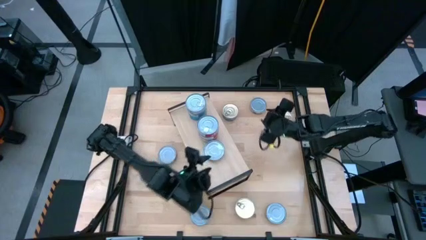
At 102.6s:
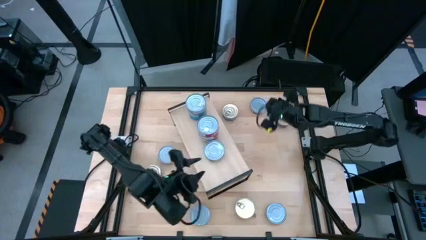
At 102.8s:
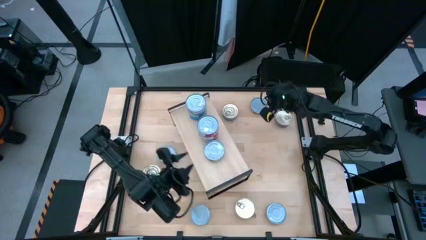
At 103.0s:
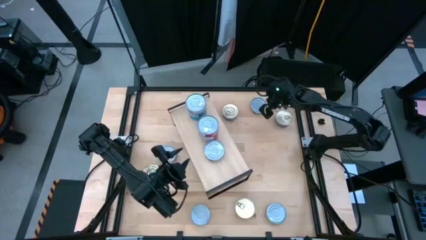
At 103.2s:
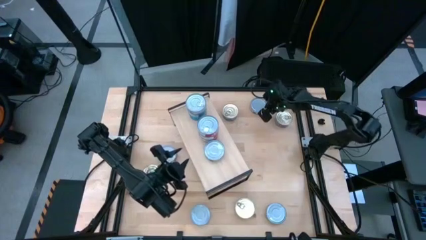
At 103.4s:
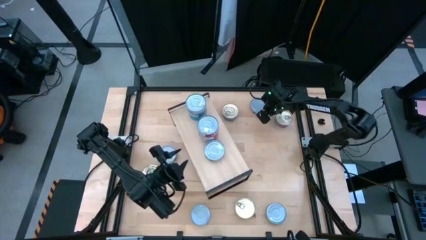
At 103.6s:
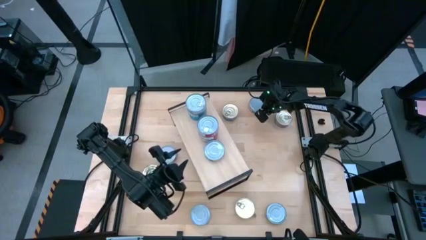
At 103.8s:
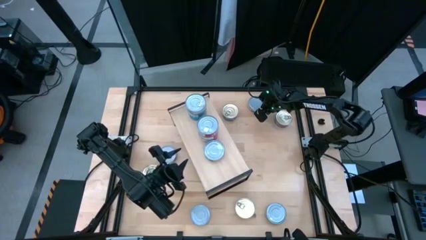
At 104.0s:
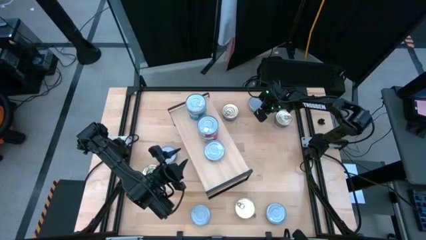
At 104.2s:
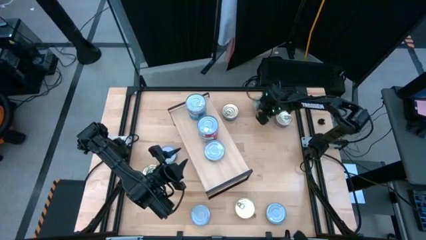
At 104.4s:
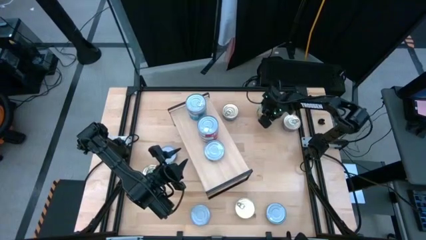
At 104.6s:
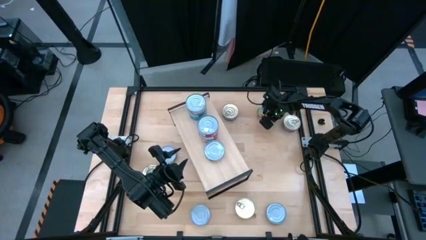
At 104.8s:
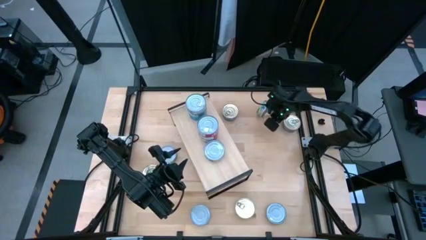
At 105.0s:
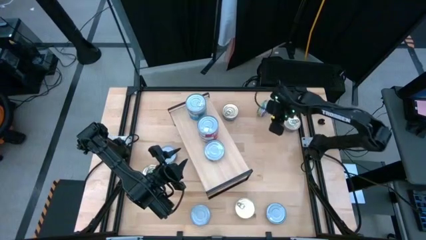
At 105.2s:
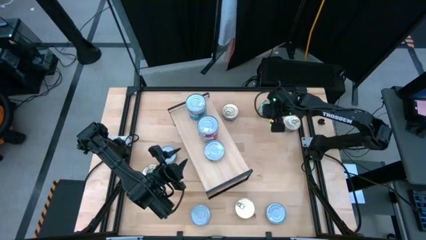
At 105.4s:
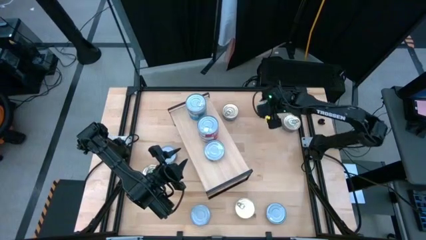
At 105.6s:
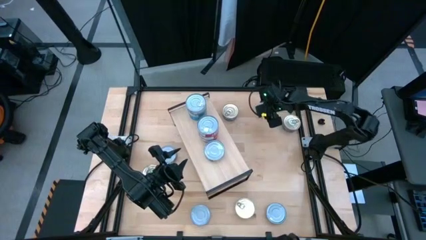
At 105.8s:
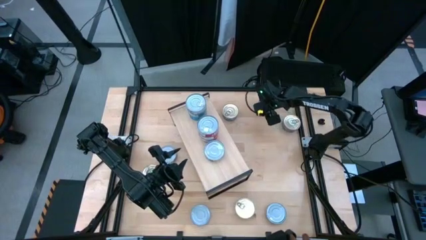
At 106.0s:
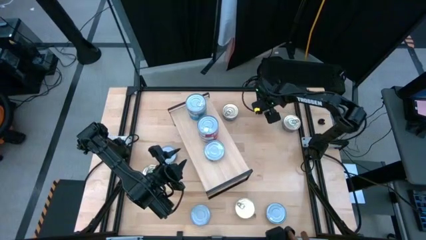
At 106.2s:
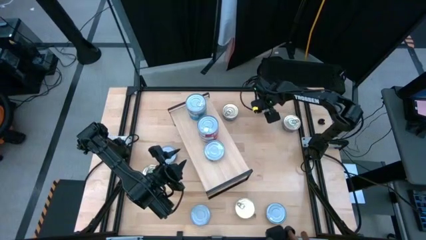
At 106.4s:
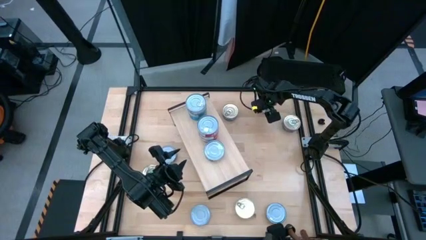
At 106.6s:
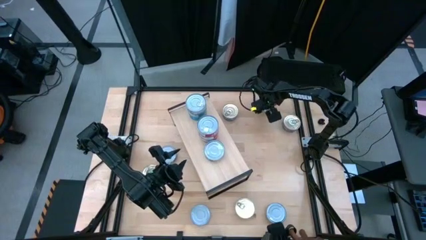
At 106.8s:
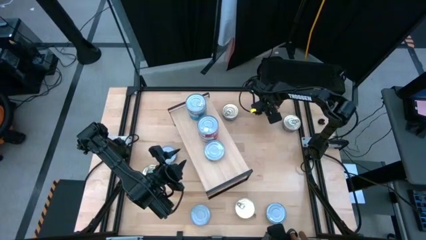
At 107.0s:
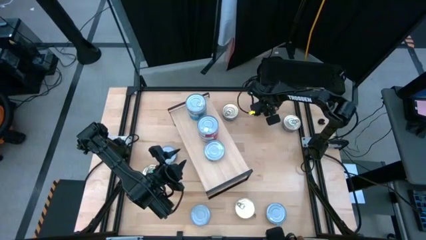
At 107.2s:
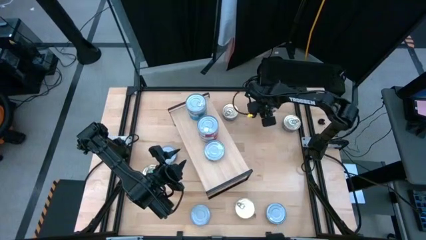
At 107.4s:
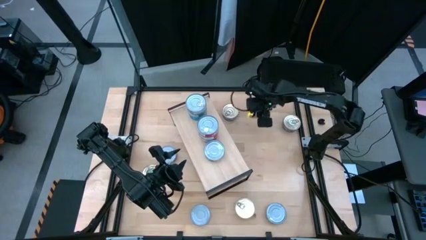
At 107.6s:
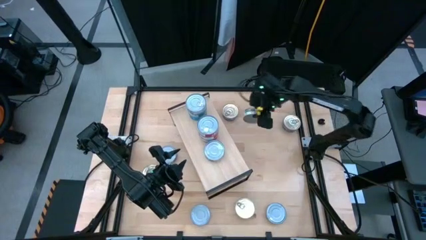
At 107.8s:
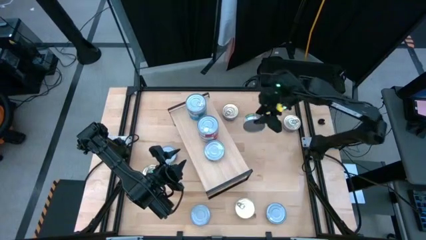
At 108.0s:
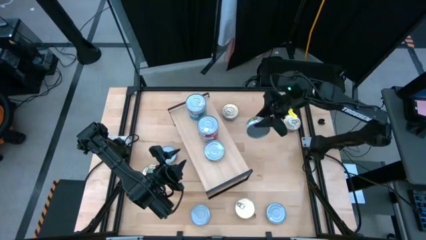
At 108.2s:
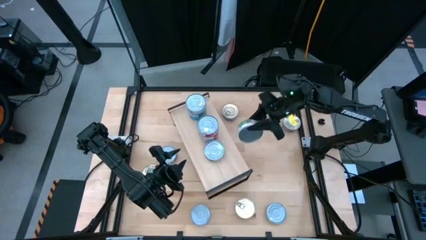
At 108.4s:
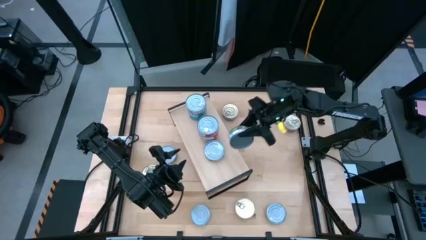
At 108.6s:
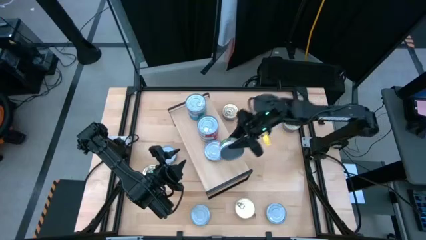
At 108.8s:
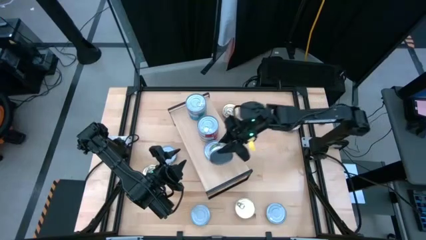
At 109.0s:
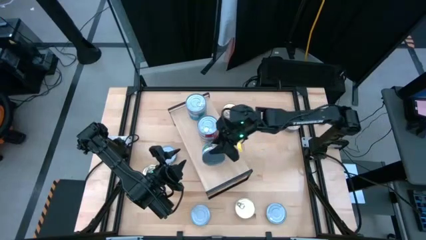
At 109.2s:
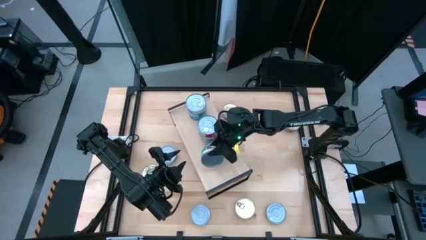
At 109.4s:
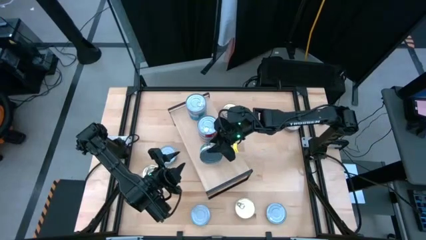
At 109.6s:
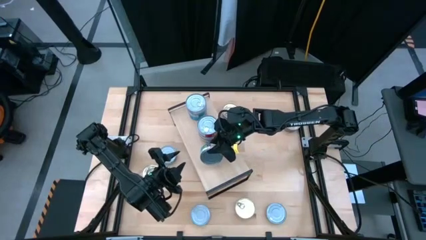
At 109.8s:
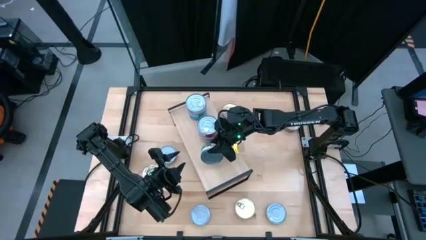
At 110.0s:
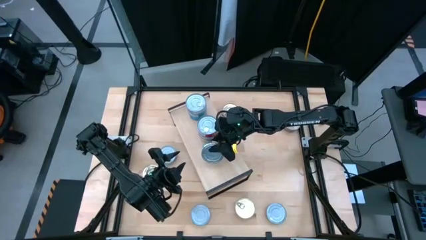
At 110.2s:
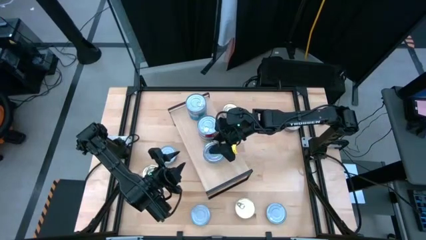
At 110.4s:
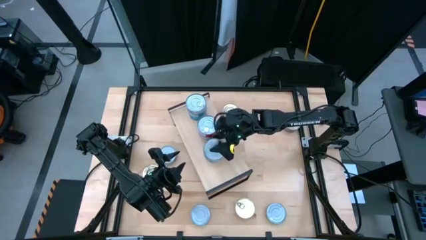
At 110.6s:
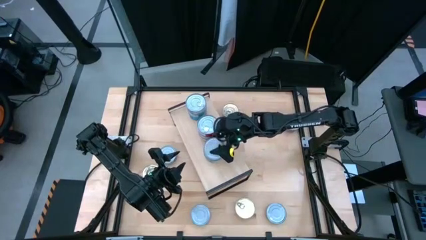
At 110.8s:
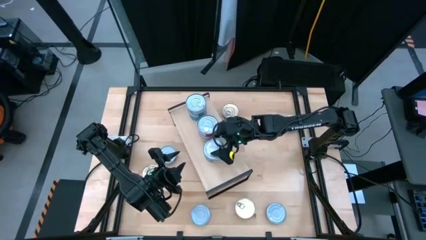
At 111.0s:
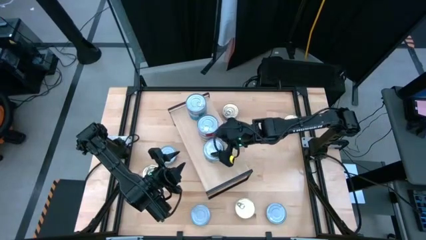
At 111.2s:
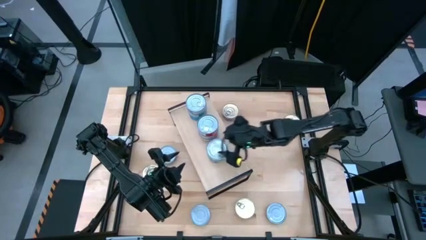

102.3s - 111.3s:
Task: Stack canned seafood by type on shelf
Stack the green tuna can on top of the green tuna can on the shelf

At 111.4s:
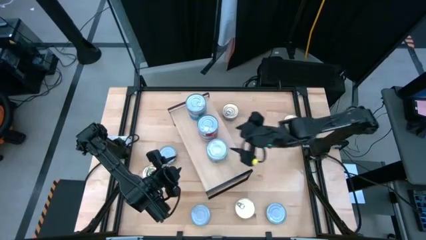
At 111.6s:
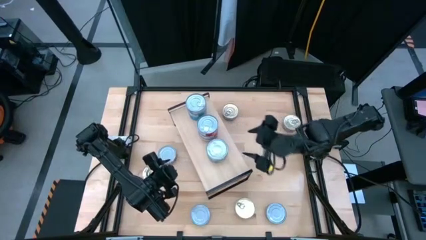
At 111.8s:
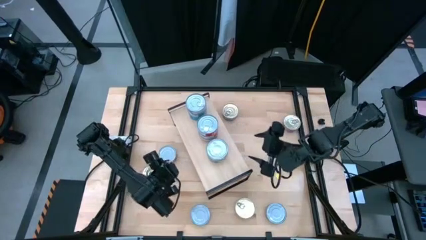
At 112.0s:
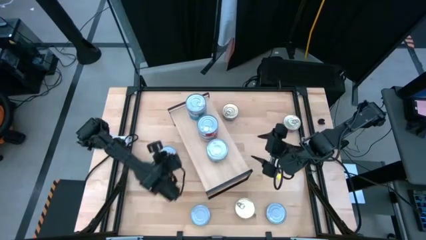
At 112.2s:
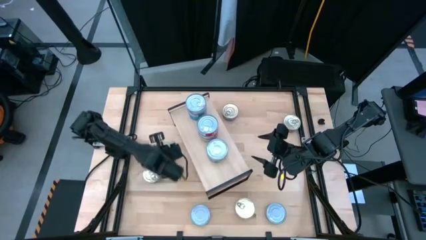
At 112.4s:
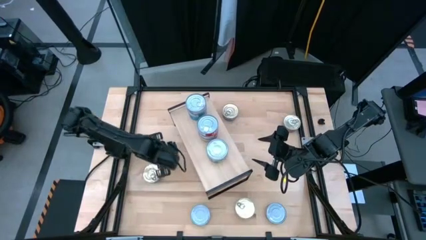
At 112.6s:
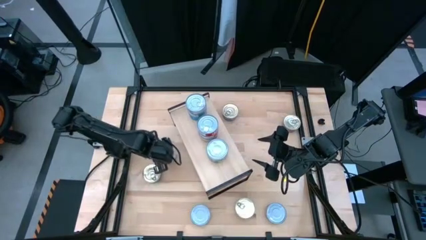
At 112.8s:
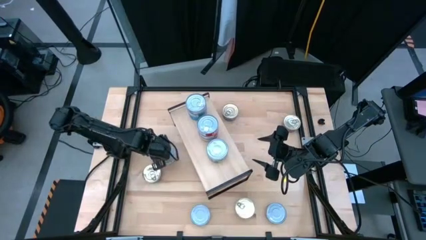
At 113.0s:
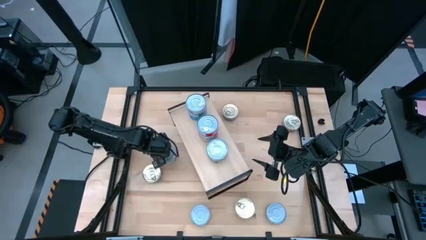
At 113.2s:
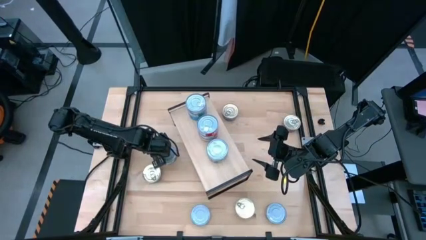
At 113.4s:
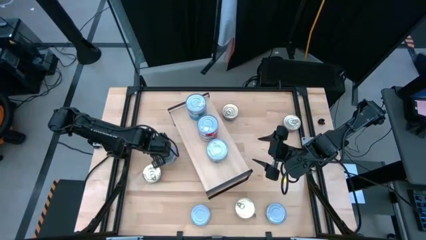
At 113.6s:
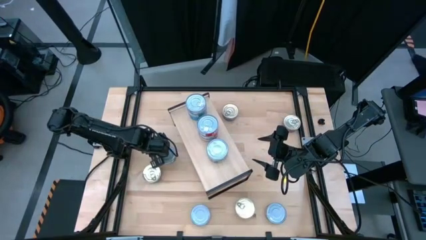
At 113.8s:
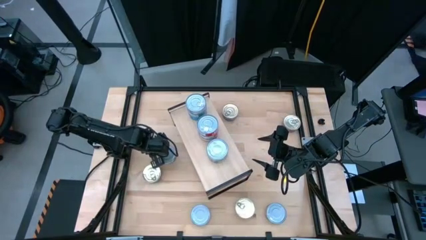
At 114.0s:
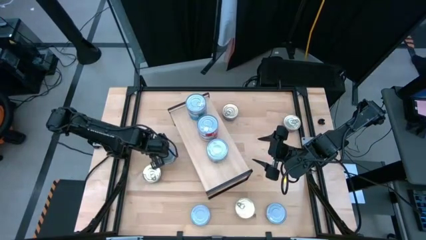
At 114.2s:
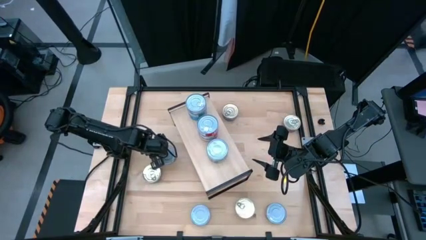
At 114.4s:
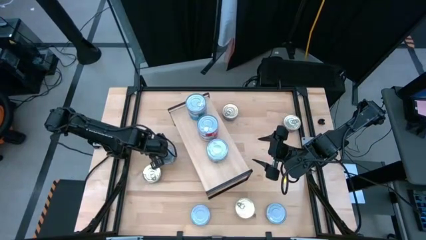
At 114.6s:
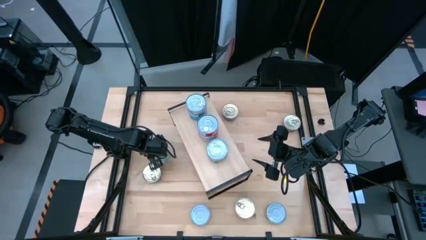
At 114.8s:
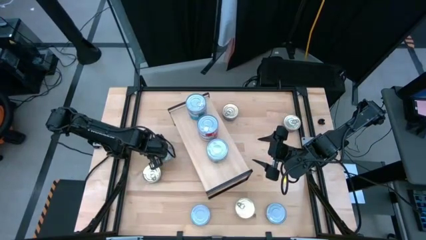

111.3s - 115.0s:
Stack the green tuna can on top of the green tuna can on the shelf

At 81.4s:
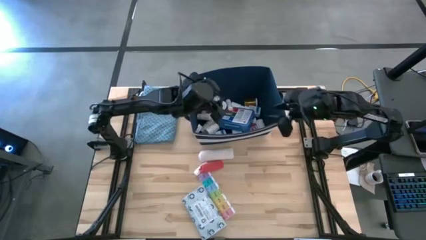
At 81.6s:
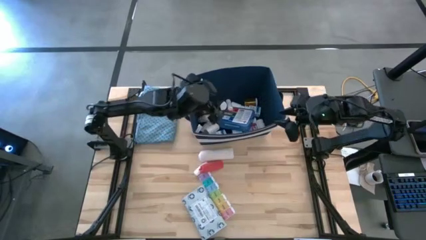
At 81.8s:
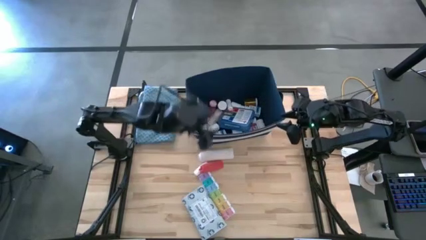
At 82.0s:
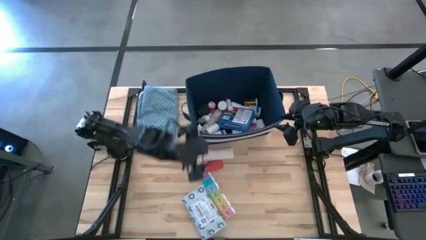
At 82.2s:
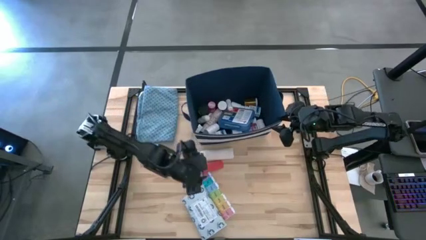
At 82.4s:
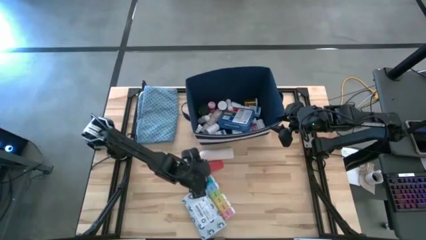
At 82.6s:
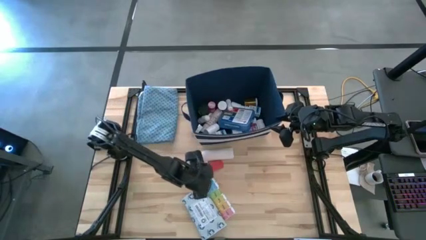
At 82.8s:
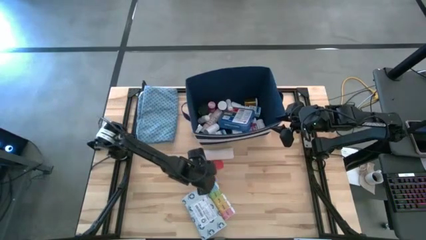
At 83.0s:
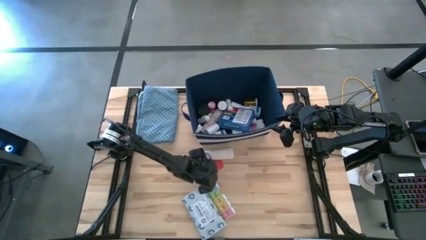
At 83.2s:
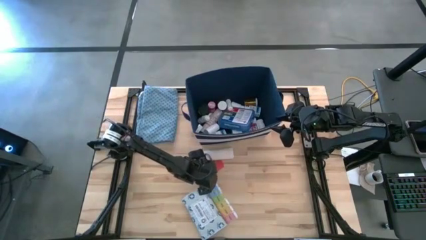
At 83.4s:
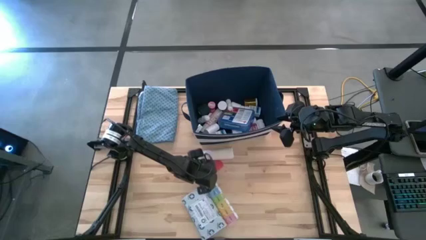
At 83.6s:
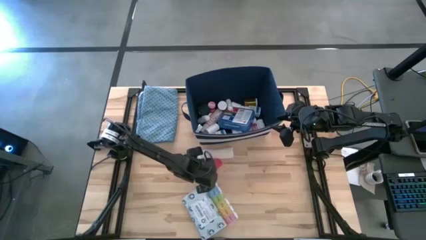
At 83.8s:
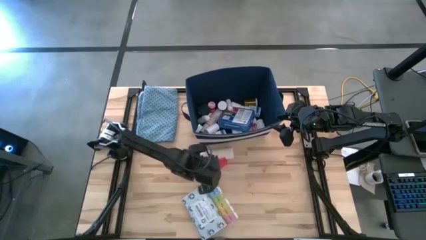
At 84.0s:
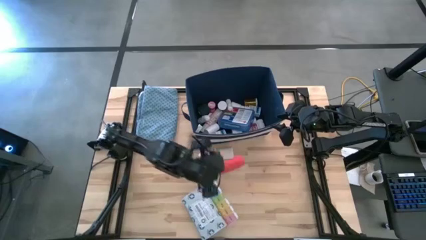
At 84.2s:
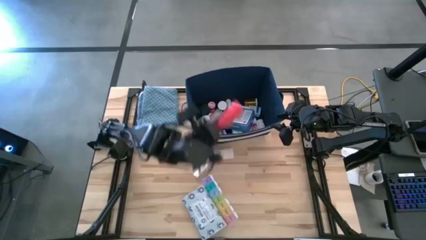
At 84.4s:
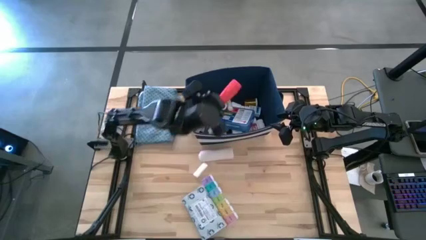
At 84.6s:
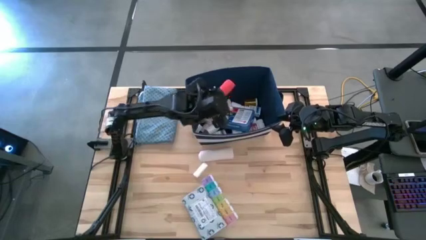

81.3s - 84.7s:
Task: Pick & place medical supplies in basket/bin
Put the orange bandage into the blue bin

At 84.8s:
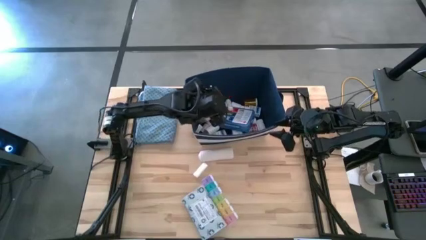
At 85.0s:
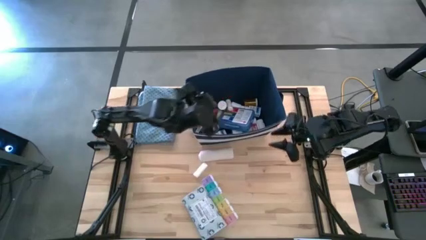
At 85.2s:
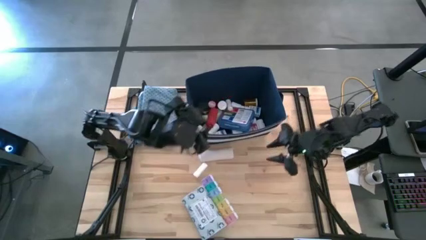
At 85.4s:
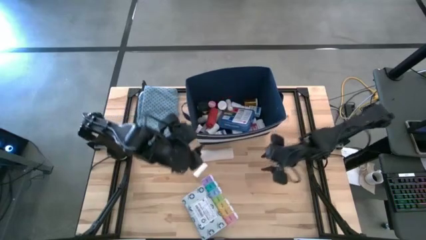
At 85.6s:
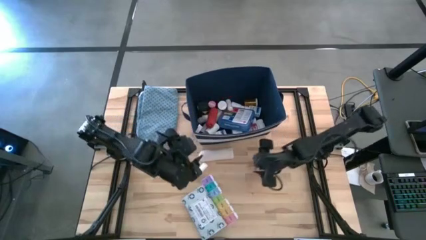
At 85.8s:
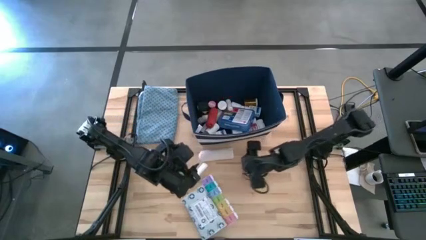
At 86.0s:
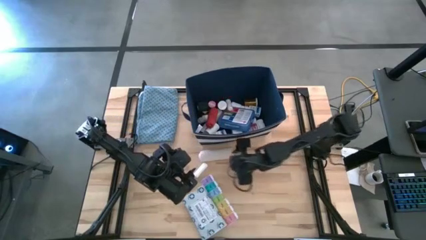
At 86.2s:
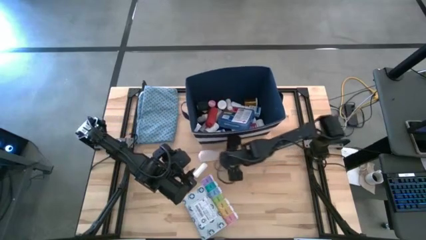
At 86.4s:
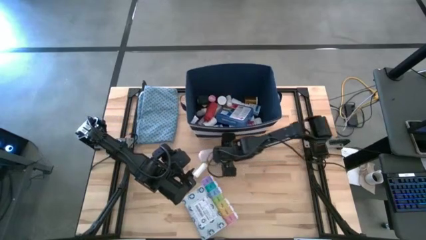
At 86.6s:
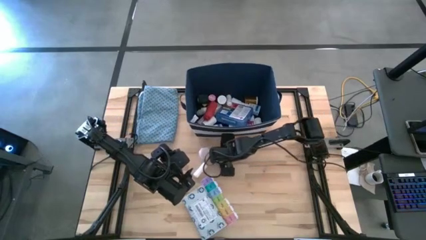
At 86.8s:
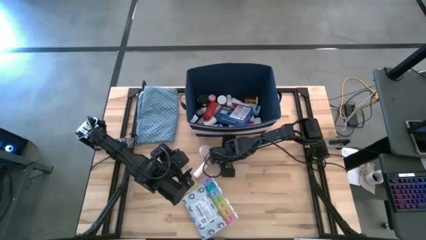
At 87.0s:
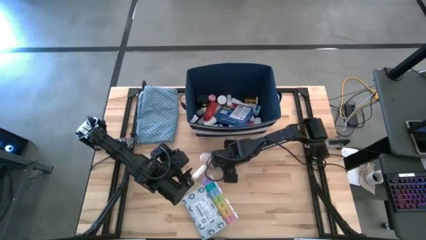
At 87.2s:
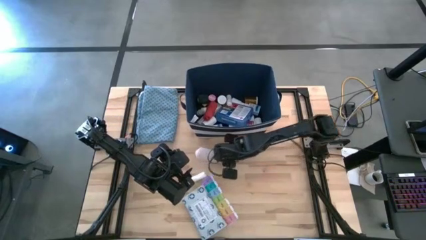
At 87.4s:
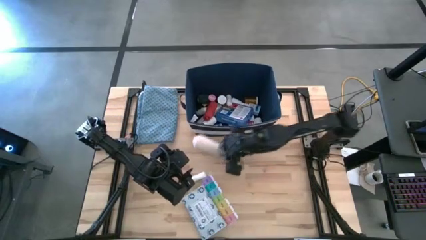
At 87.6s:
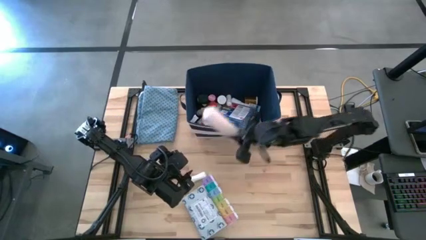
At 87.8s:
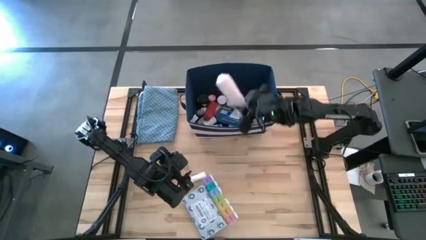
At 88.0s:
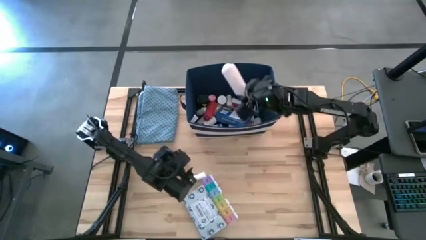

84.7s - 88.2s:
Put the brown bandage into the blue bin
